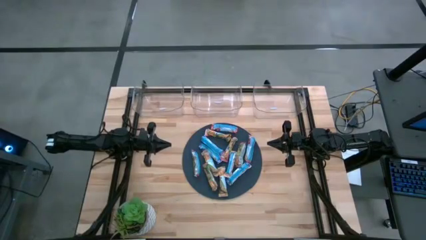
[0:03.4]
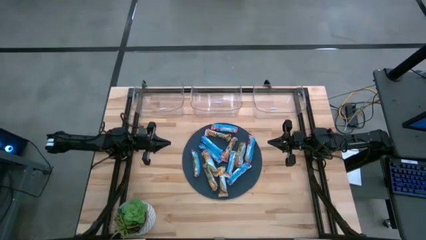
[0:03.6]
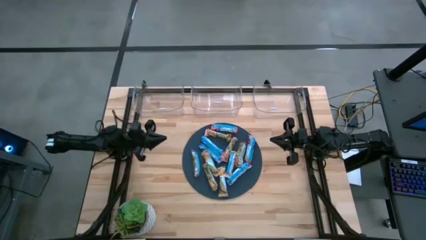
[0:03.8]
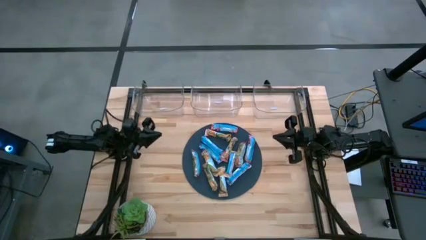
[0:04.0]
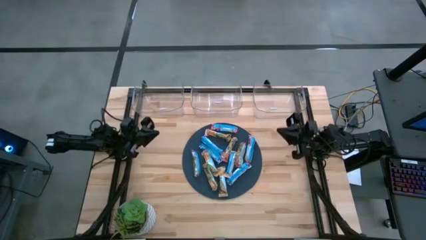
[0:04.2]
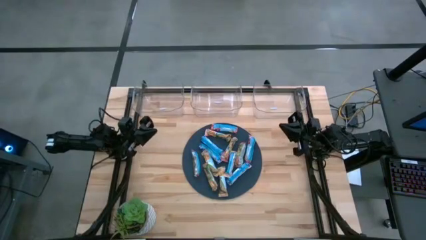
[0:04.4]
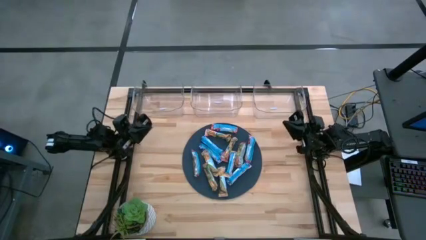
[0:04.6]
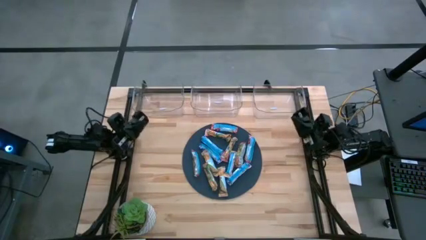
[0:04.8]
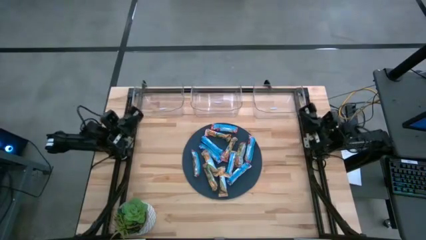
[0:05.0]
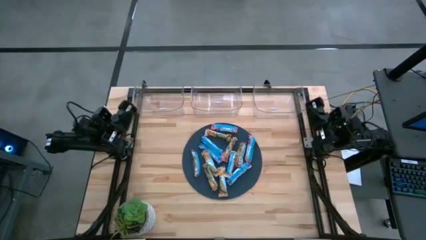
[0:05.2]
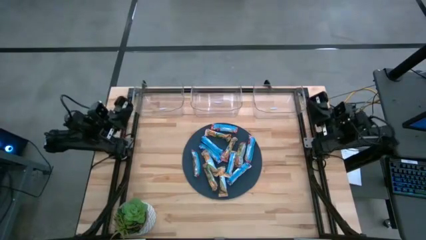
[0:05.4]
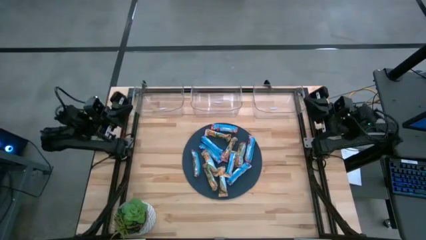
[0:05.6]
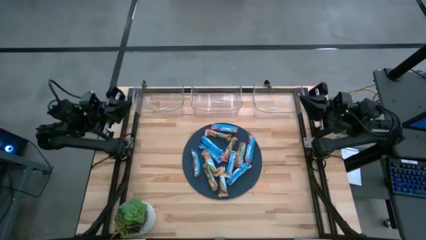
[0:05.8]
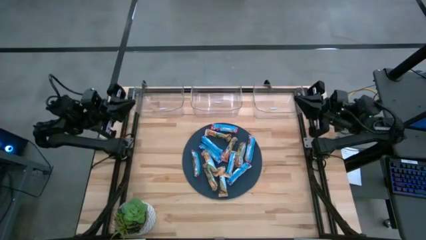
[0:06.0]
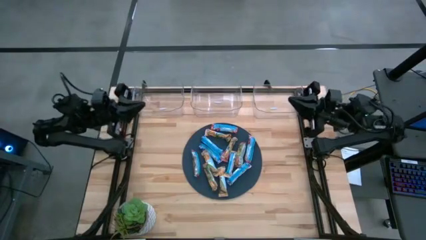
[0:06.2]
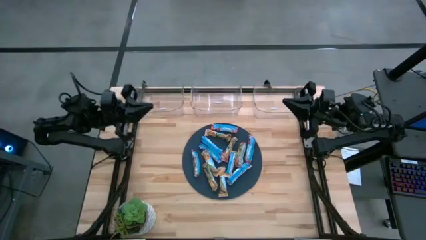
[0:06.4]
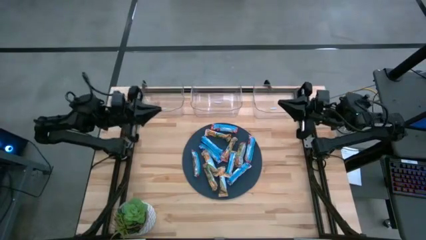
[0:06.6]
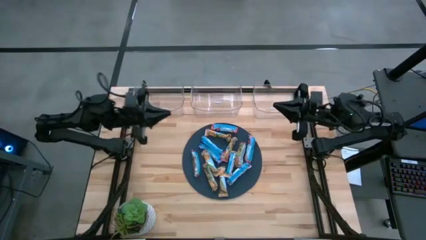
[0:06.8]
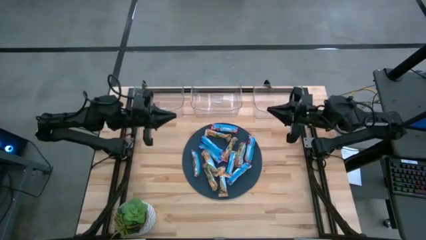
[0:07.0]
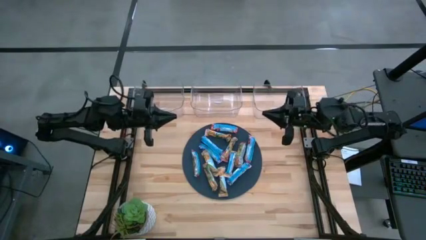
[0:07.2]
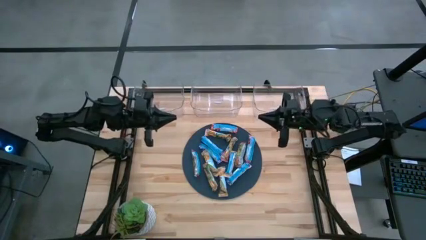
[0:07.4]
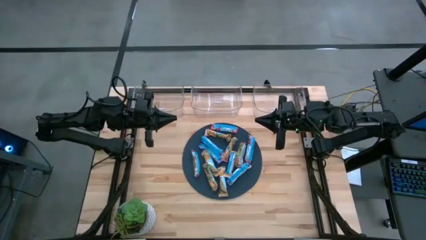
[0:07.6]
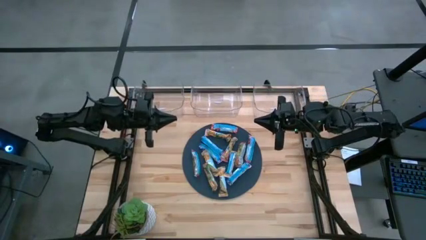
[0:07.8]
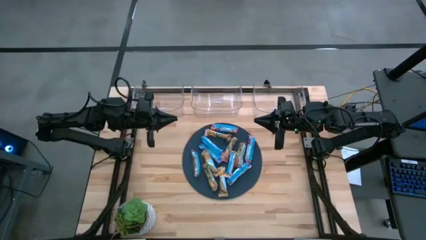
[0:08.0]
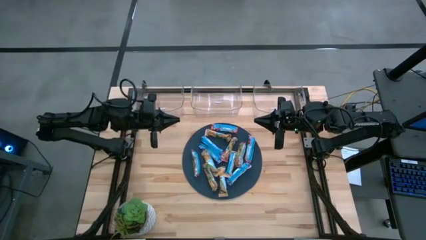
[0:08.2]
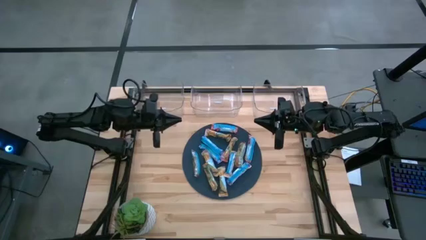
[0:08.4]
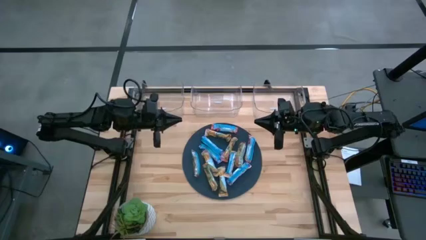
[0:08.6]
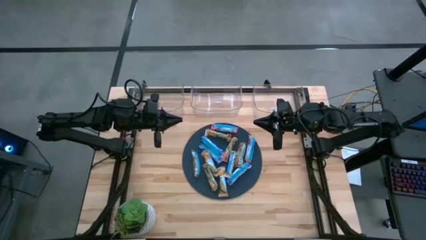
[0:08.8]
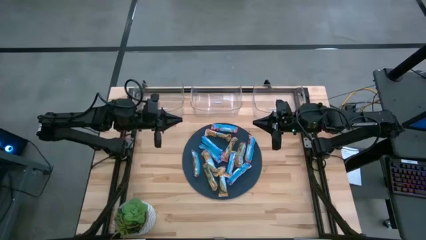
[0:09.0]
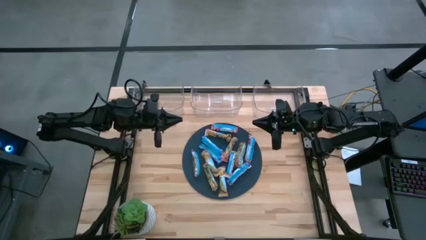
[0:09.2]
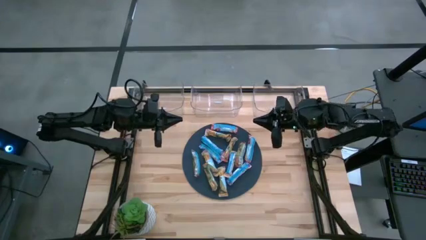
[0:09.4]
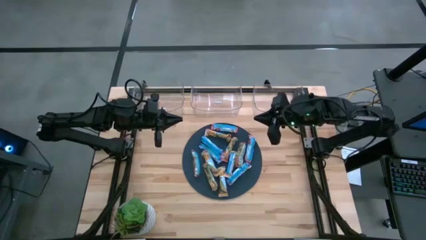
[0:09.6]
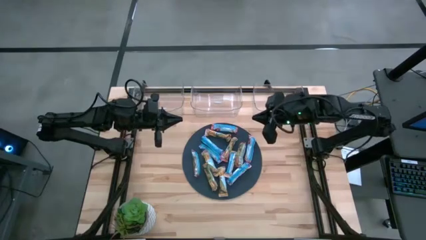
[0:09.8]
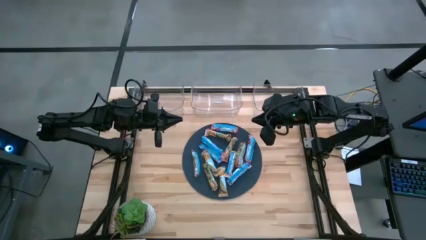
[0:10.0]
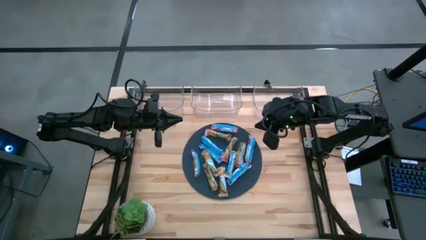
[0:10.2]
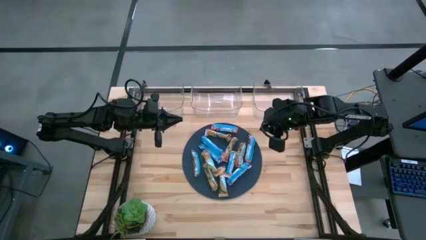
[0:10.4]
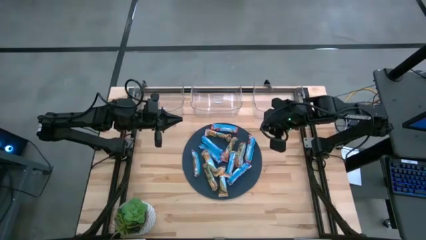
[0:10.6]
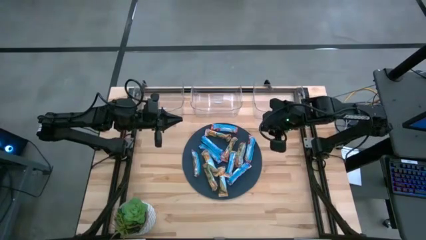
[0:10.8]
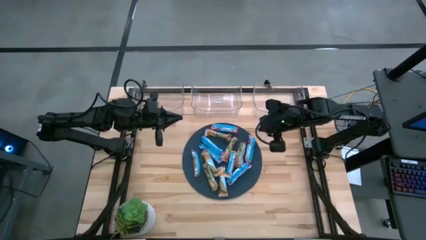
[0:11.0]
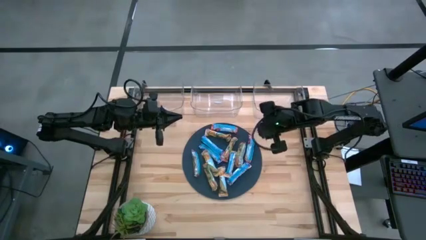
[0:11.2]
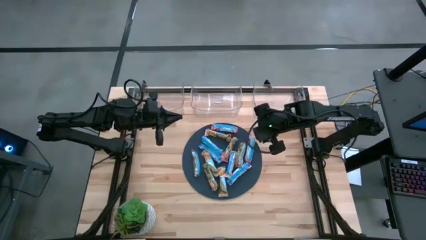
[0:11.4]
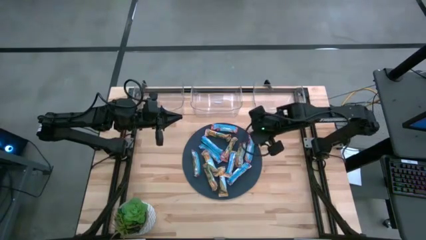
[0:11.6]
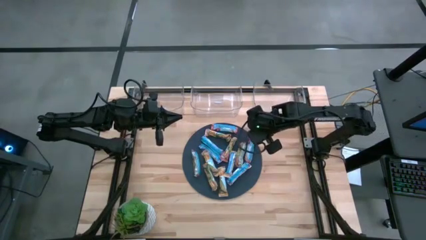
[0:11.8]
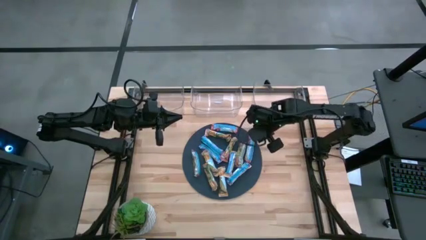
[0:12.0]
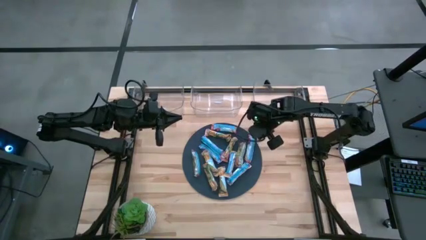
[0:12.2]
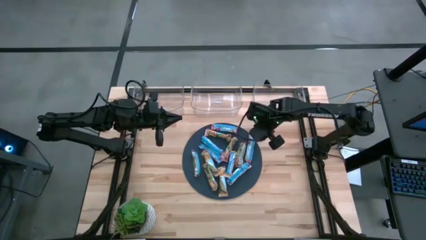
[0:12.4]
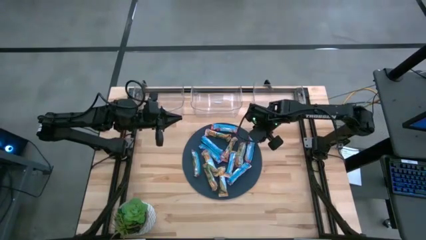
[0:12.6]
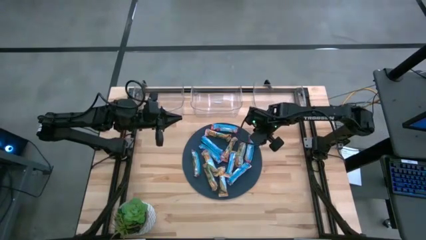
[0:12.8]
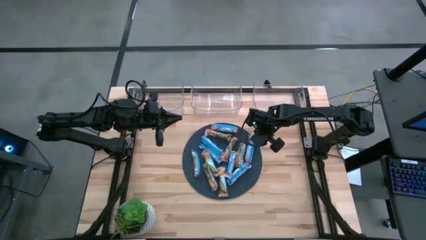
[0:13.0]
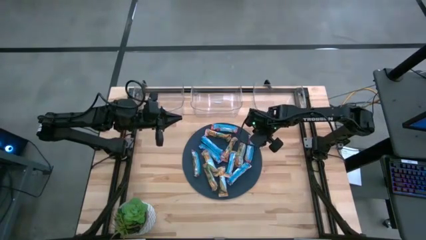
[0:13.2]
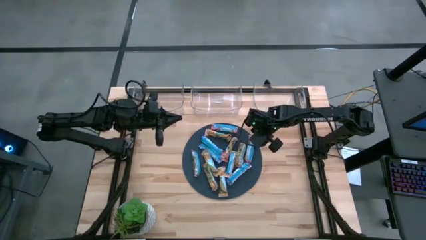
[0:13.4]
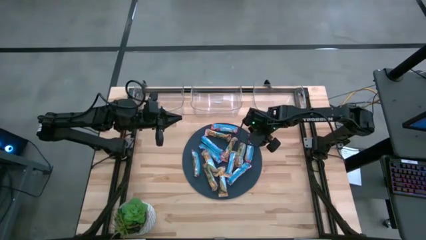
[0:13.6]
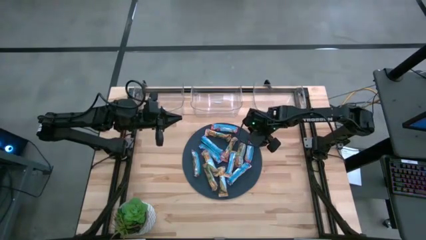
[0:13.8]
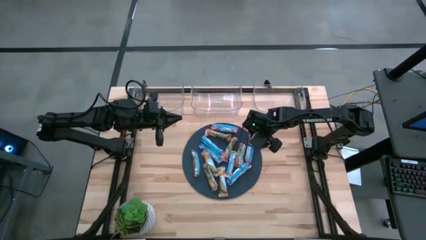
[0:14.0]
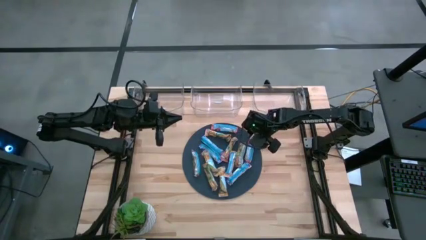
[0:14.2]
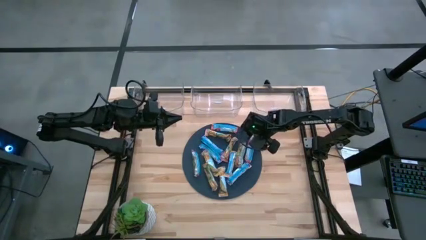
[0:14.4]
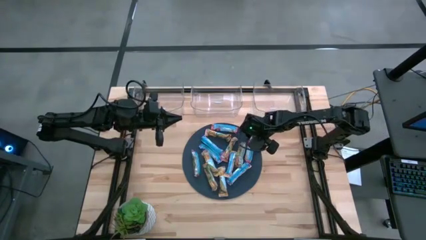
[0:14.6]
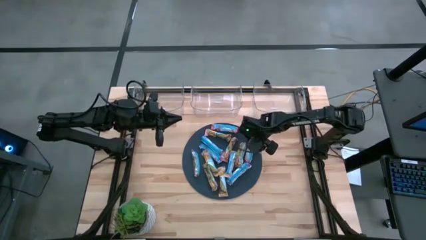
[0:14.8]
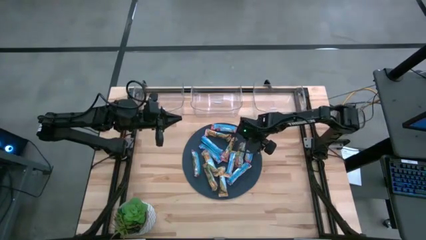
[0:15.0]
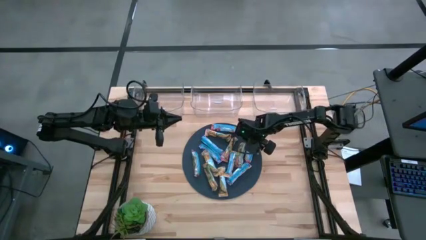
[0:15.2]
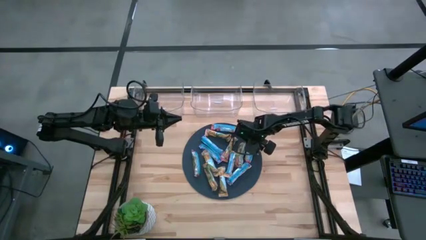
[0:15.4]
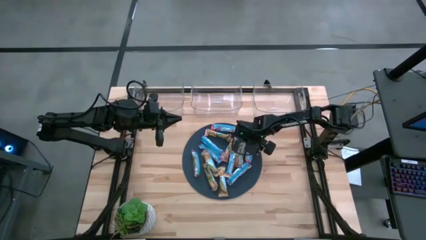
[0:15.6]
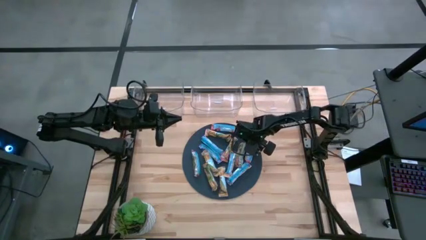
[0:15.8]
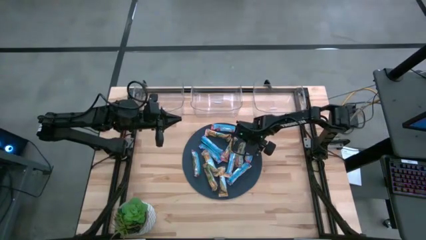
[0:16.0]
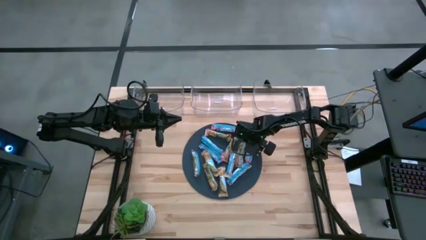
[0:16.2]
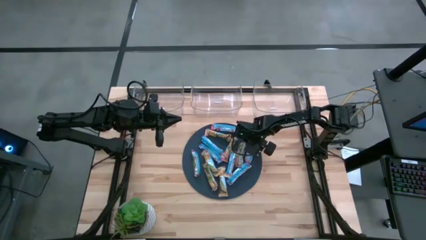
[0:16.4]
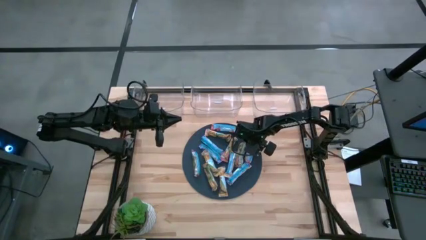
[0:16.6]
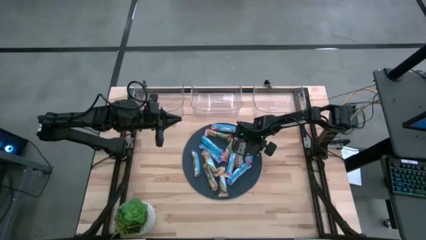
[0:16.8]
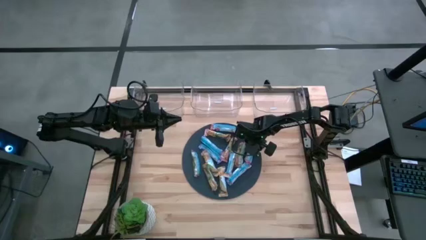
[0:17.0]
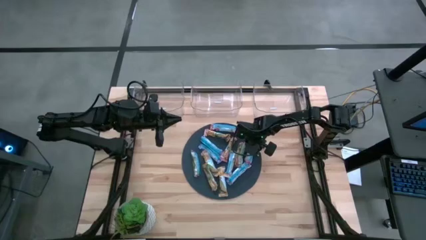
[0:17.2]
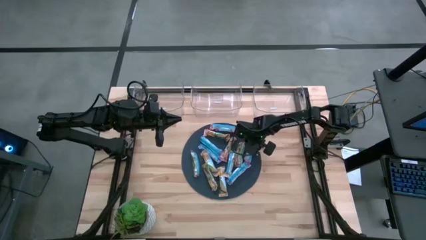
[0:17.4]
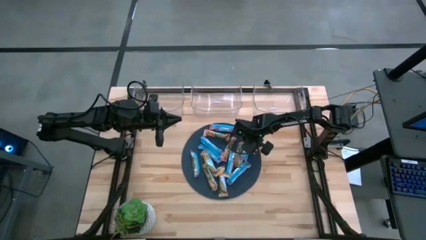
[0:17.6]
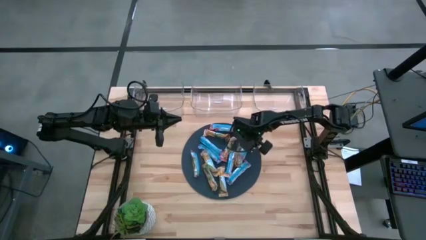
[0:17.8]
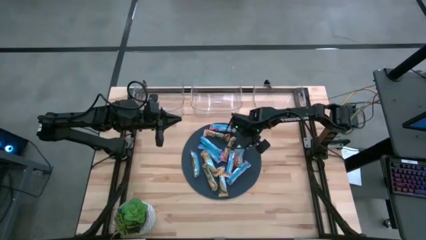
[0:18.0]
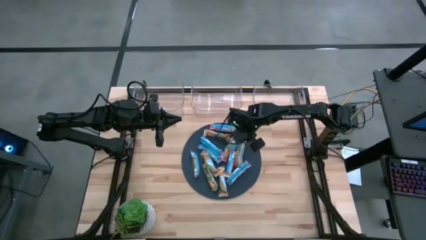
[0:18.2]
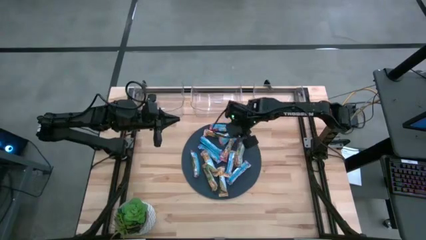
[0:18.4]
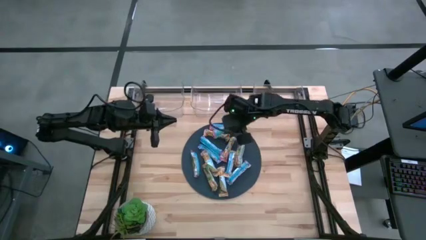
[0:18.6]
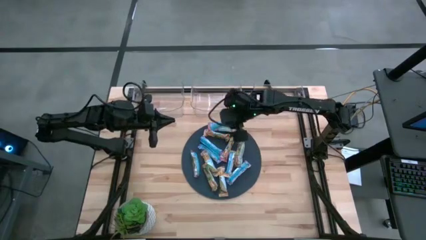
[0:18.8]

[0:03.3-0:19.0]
Task: Pick and place Granola Bars by type
Put the red granola bar into the left transparent bin
